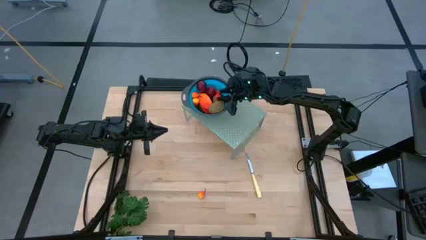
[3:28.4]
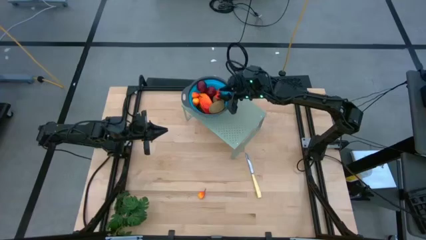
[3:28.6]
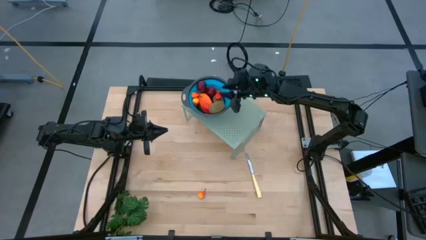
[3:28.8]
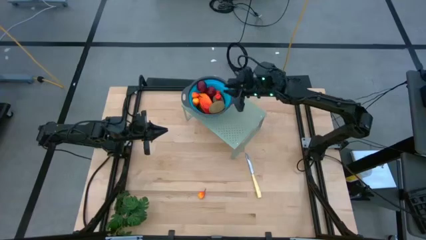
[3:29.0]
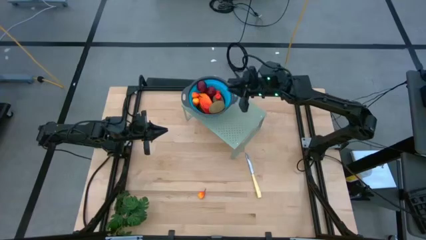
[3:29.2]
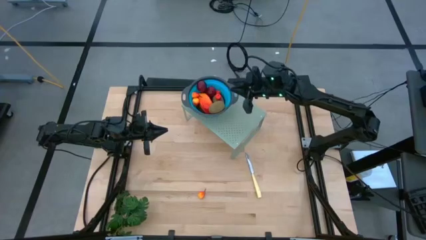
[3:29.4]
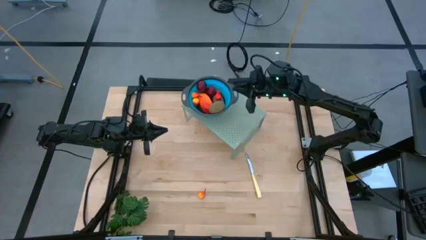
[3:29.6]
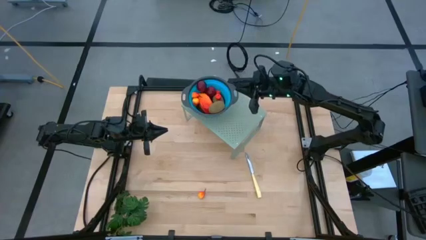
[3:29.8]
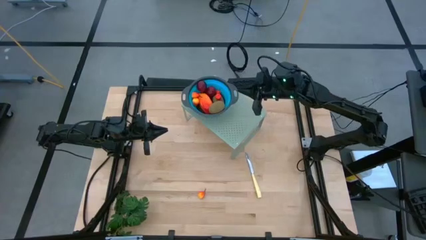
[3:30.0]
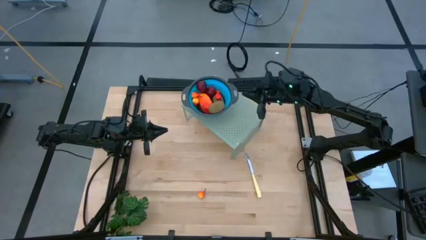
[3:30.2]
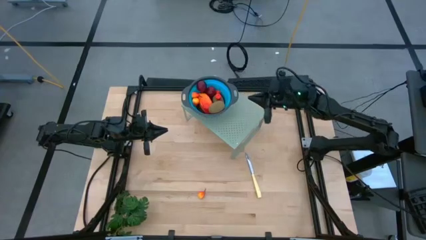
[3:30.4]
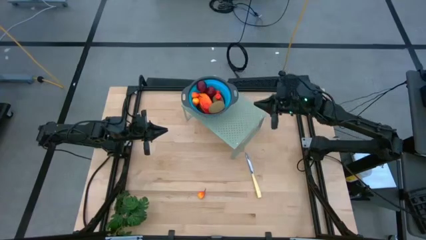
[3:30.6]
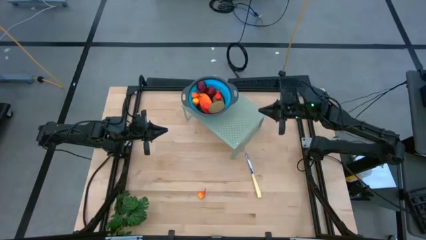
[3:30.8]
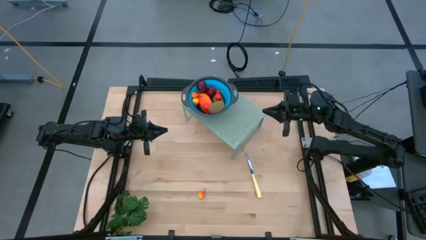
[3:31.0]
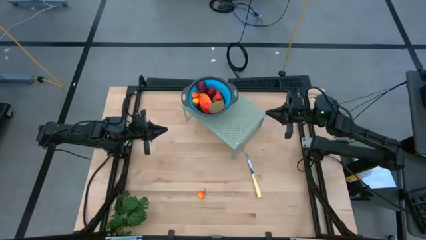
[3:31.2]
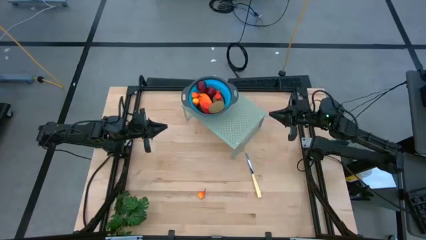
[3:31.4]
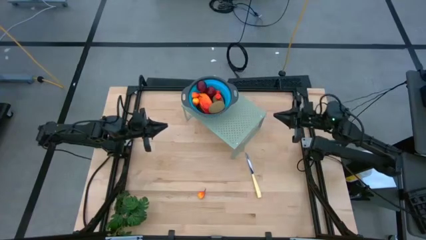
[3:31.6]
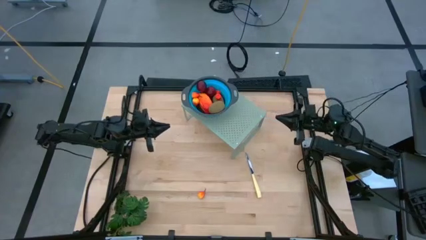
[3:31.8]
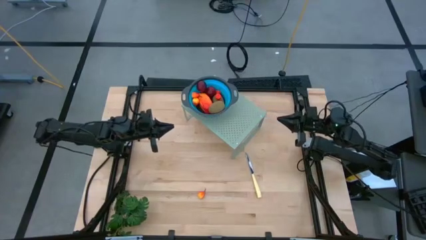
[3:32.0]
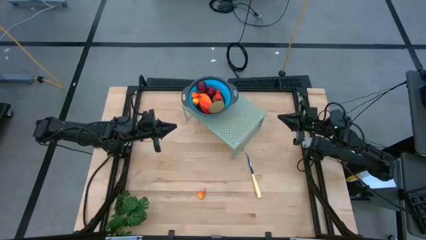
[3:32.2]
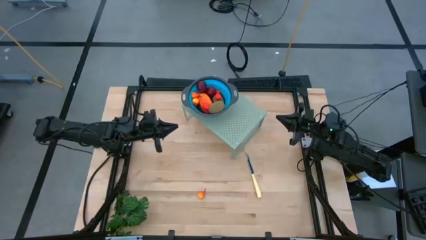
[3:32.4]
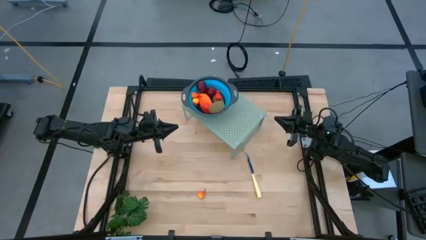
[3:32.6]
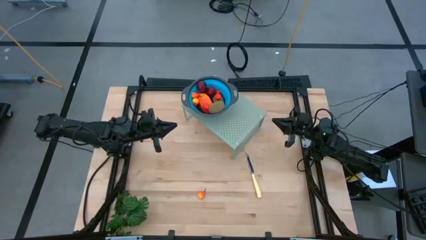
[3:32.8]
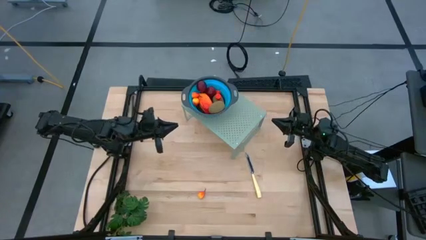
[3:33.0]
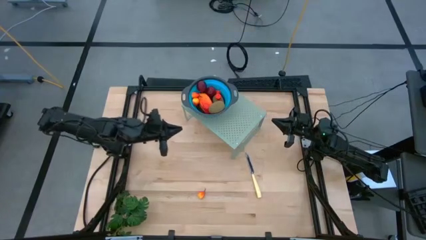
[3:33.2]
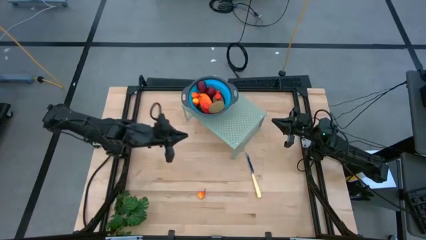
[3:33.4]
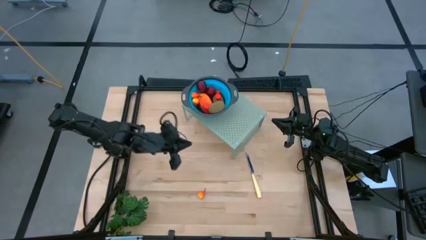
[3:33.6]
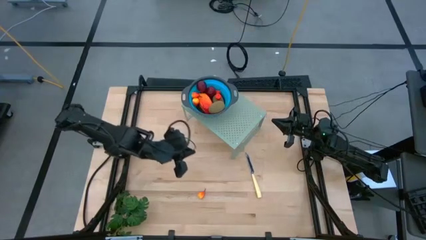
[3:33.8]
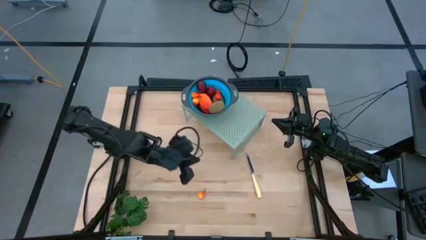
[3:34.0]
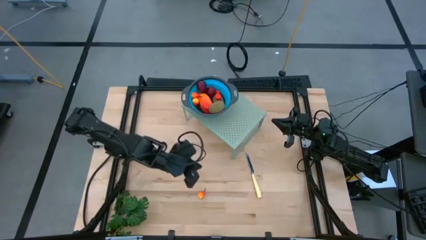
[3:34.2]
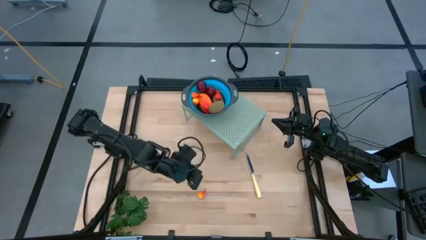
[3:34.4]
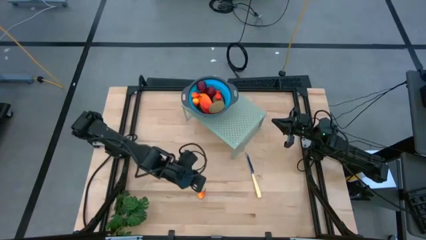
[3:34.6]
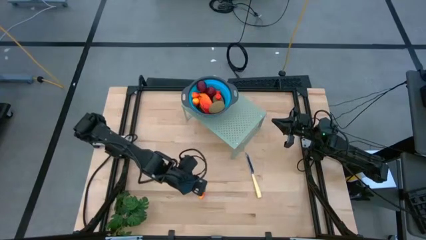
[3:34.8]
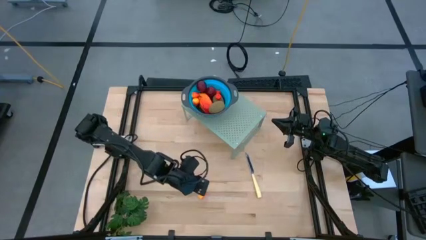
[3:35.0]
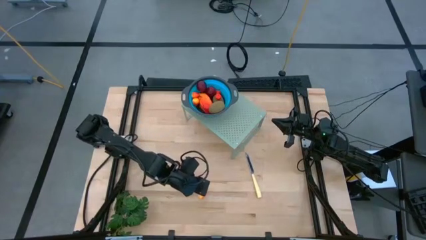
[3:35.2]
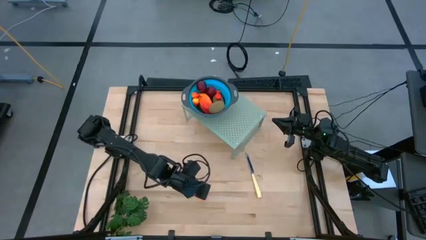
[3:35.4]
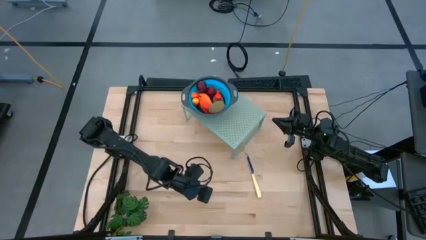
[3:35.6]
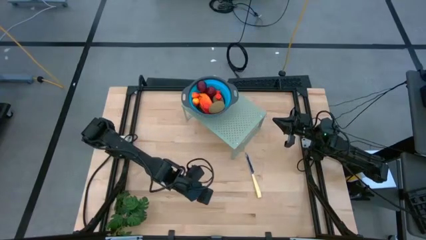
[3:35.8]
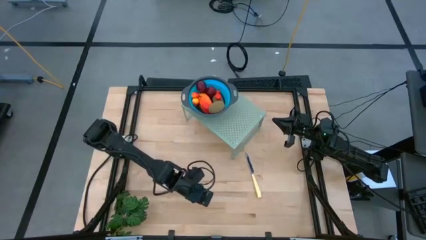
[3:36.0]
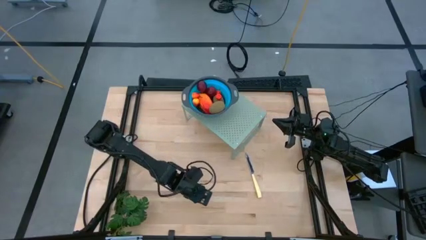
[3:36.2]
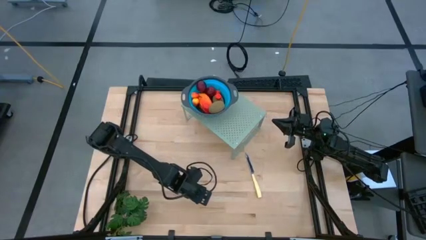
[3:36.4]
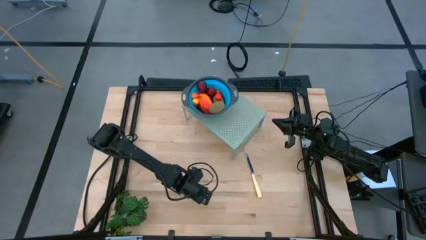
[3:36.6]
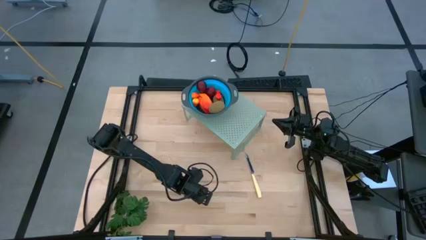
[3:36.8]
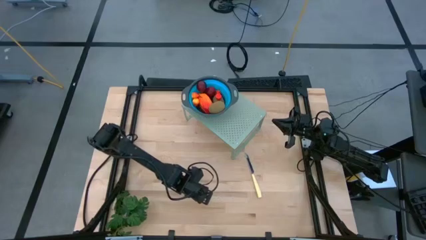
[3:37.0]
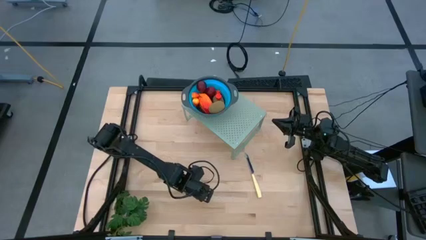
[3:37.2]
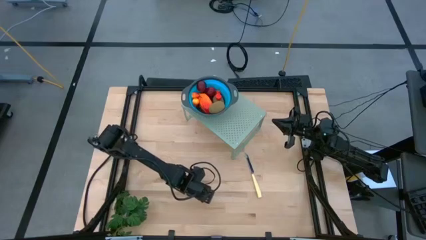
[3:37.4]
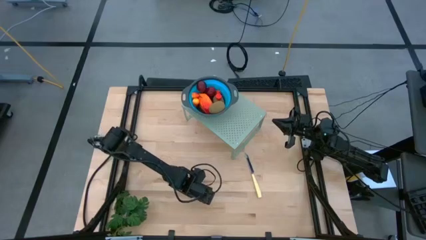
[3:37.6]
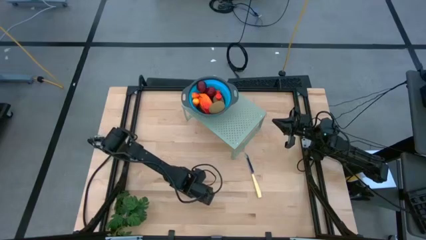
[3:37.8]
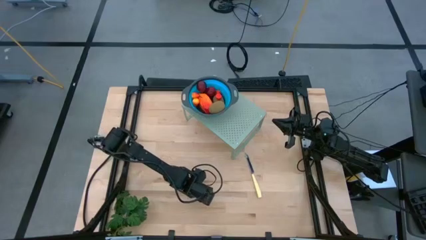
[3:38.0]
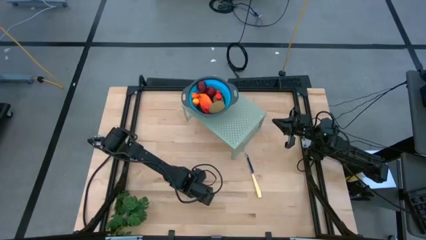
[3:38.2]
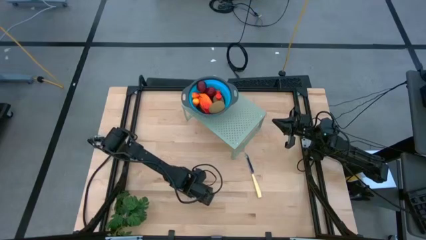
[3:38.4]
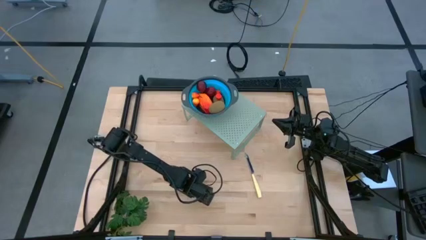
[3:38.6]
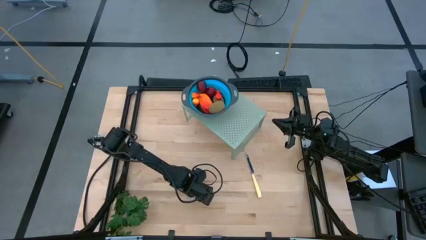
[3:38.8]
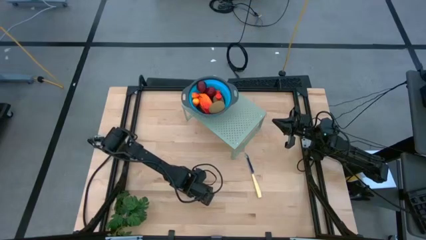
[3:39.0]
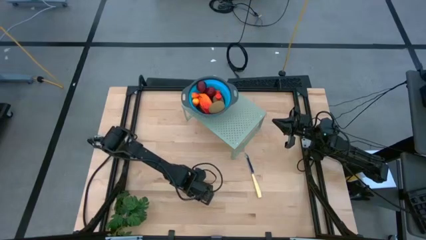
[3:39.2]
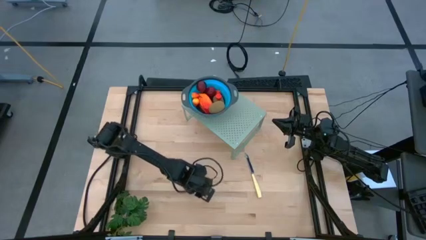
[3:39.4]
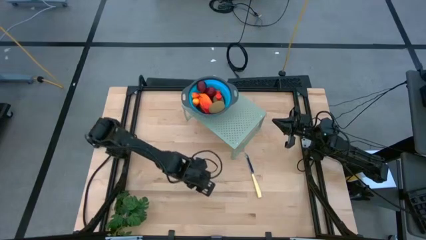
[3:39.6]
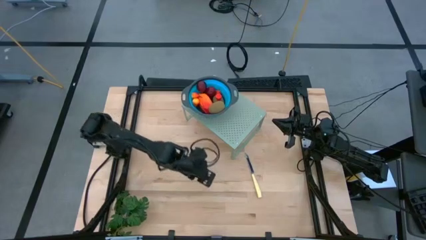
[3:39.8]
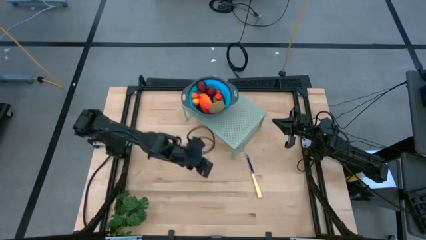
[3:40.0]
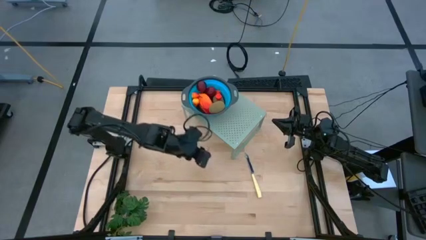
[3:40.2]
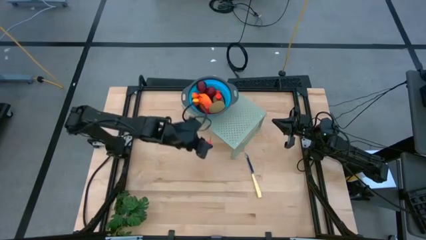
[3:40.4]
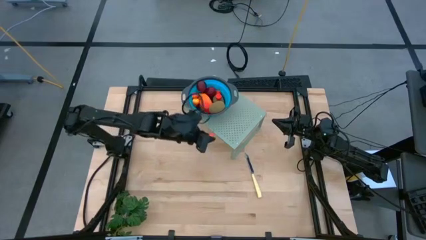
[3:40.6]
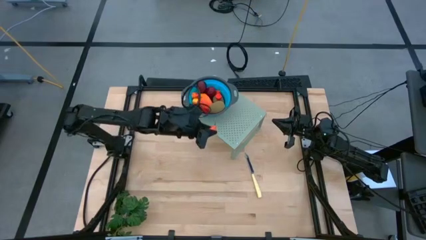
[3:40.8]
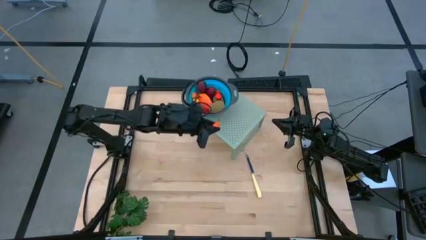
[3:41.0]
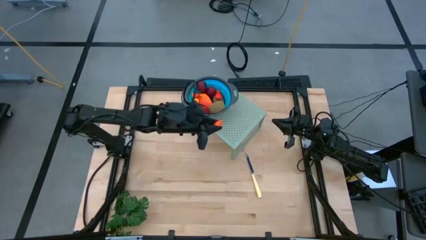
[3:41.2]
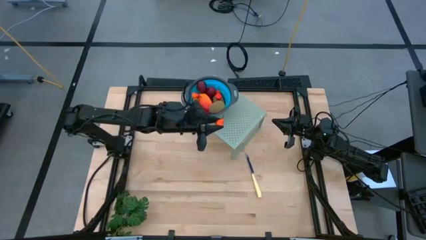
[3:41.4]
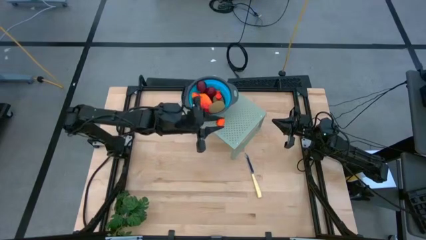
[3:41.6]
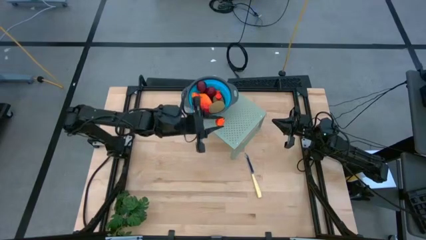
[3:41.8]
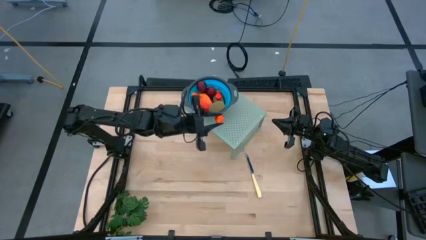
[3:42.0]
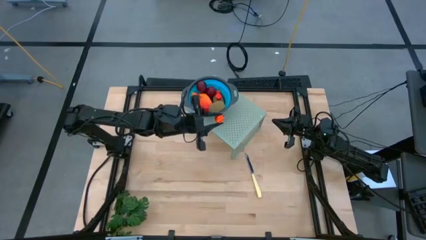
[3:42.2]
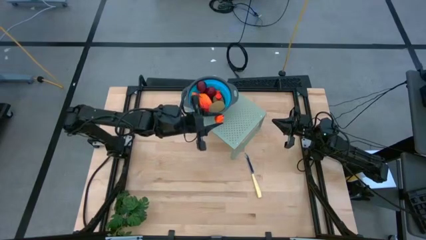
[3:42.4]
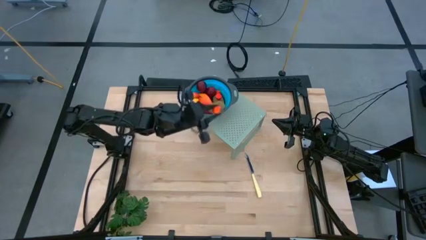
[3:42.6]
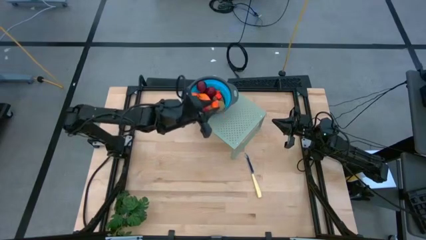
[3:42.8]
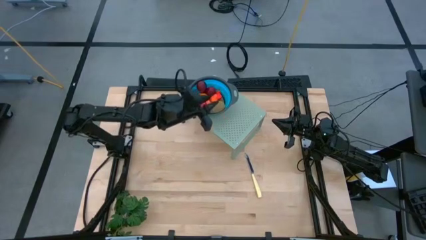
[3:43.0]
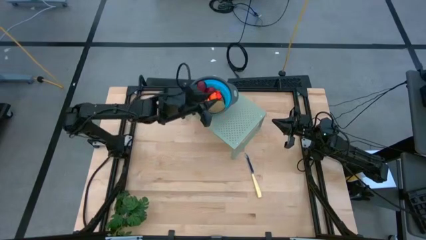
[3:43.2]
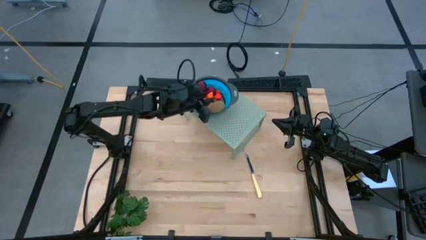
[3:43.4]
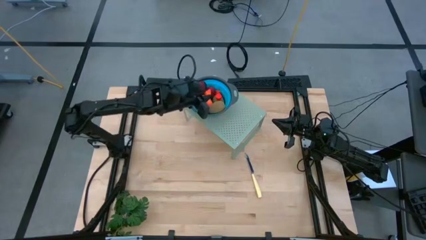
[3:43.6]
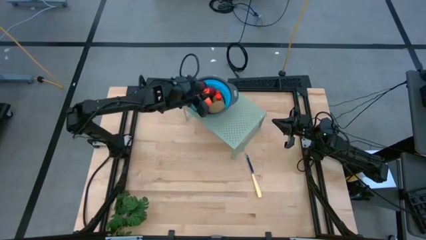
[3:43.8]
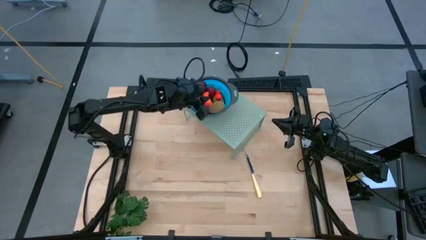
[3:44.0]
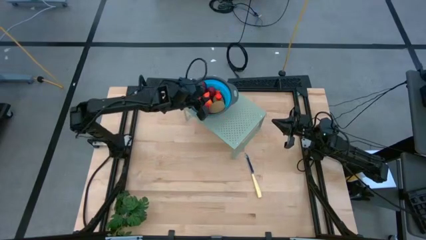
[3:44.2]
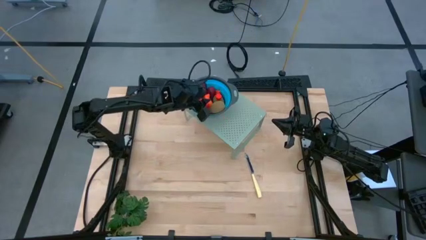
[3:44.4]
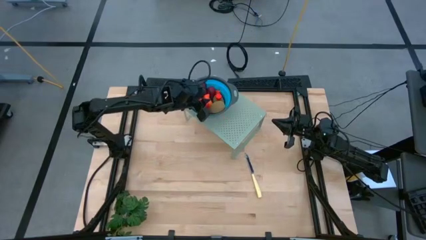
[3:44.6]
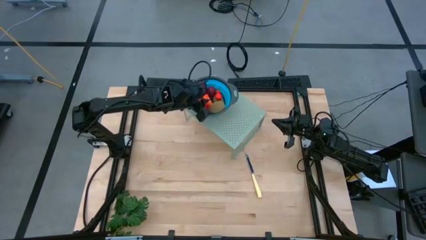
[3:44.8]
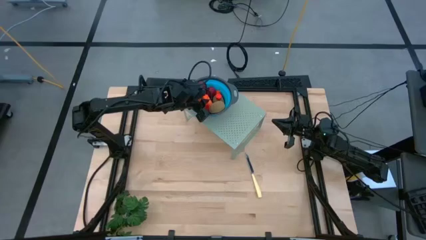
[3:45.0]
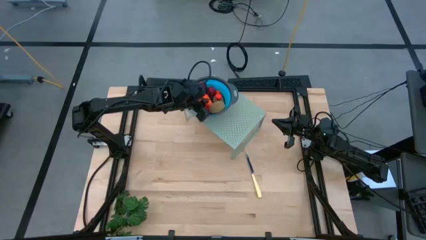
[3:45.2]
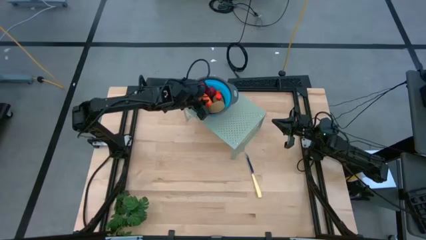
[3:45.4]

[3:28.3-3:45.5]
Task: Pick & Place Fruit
Put the pear into the blue strainer bowl on the shelf
